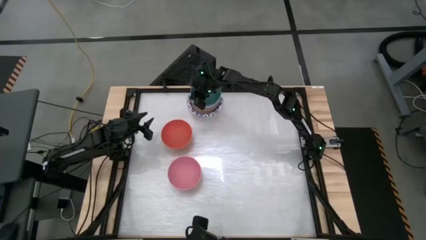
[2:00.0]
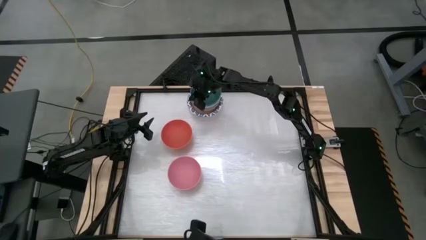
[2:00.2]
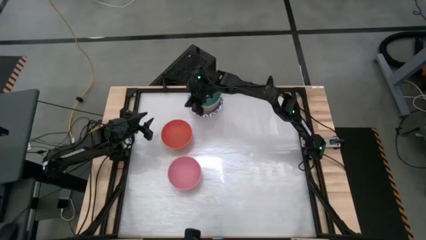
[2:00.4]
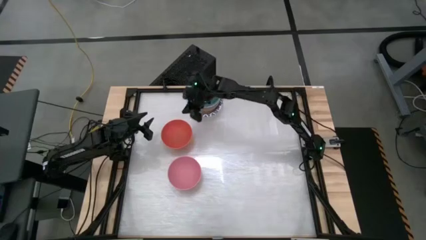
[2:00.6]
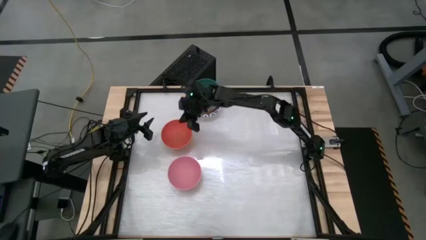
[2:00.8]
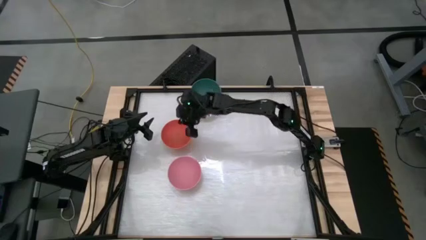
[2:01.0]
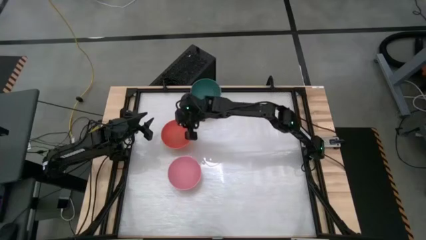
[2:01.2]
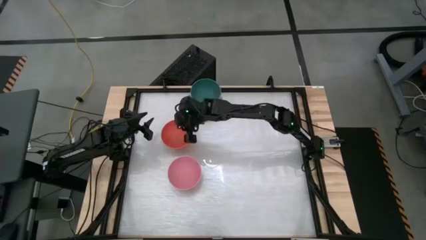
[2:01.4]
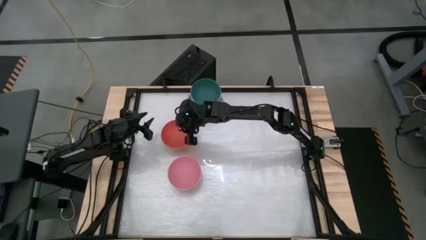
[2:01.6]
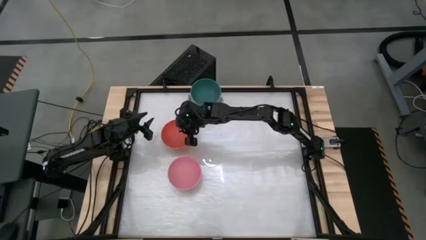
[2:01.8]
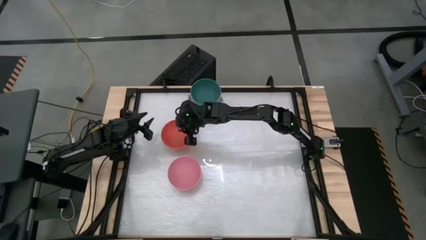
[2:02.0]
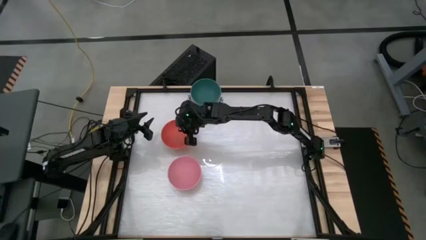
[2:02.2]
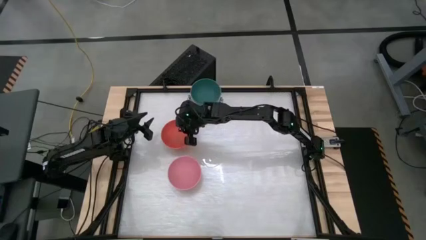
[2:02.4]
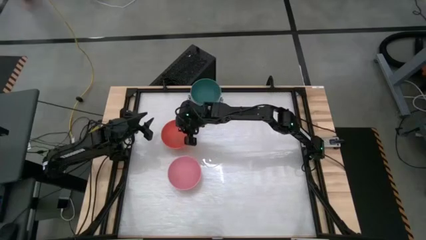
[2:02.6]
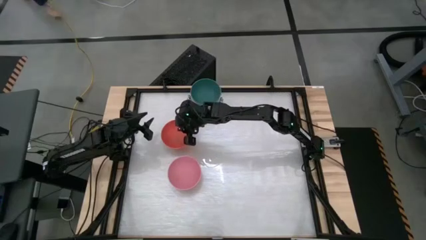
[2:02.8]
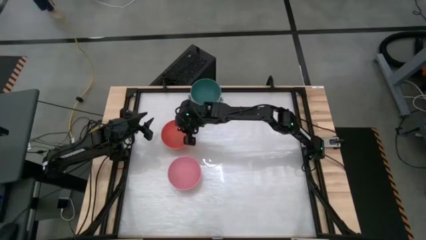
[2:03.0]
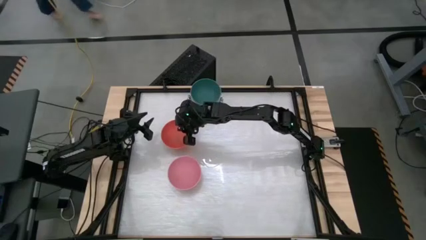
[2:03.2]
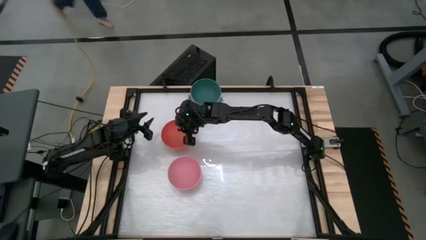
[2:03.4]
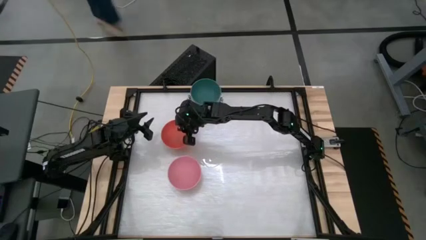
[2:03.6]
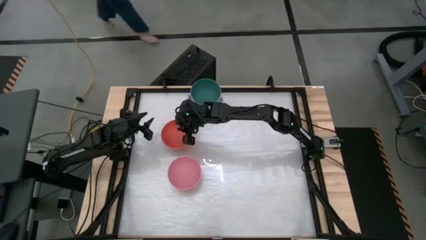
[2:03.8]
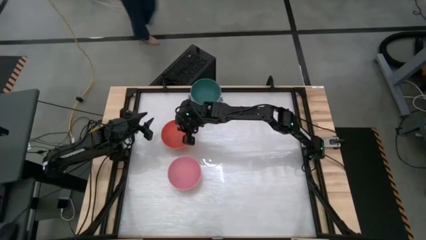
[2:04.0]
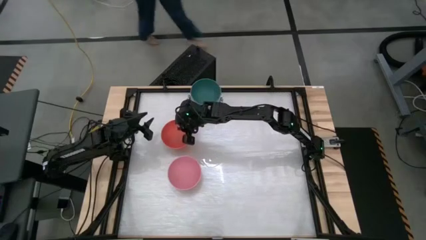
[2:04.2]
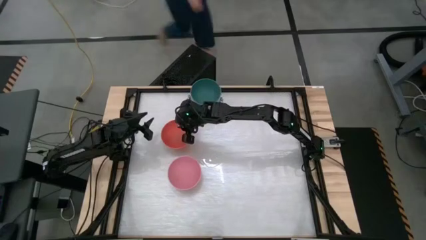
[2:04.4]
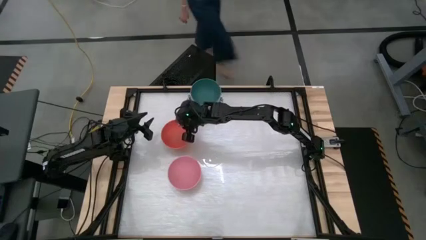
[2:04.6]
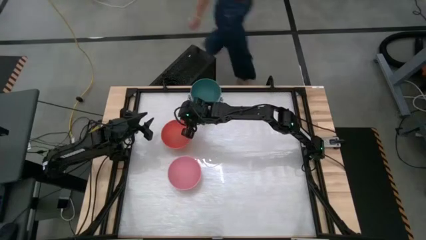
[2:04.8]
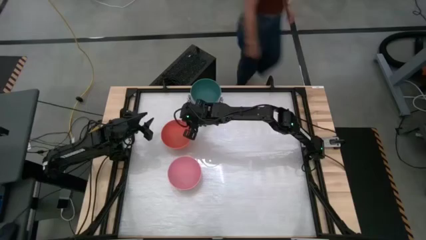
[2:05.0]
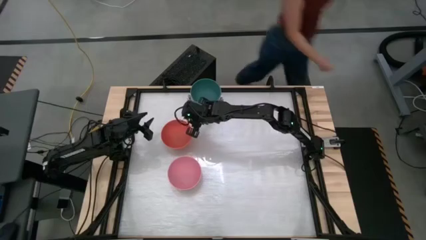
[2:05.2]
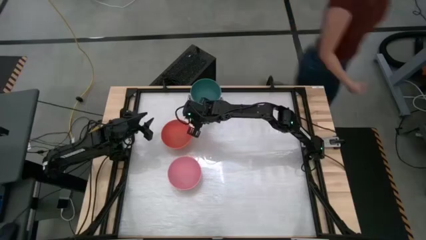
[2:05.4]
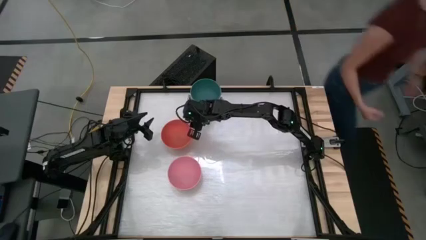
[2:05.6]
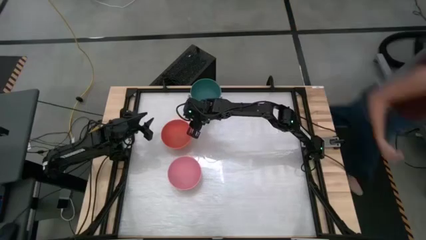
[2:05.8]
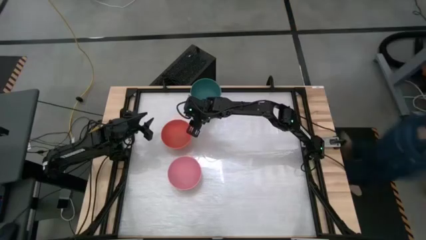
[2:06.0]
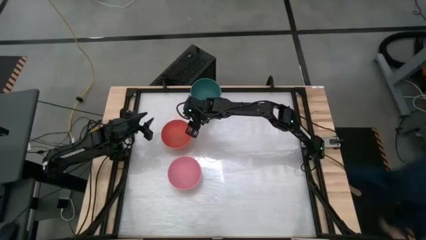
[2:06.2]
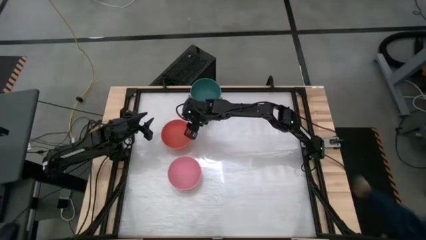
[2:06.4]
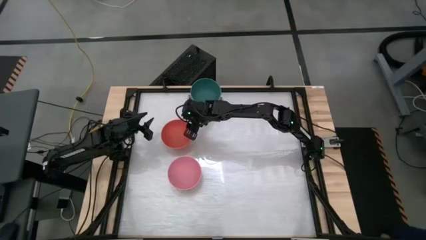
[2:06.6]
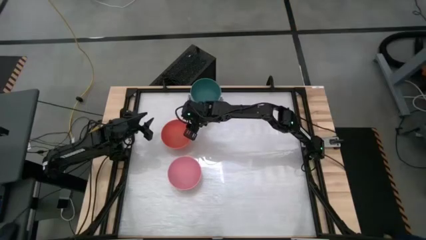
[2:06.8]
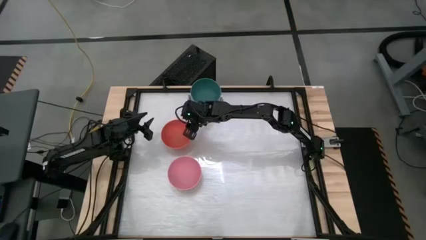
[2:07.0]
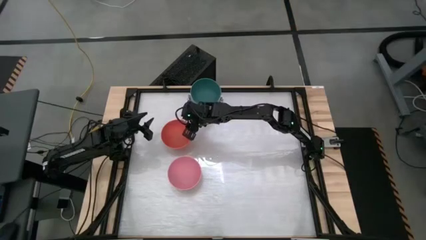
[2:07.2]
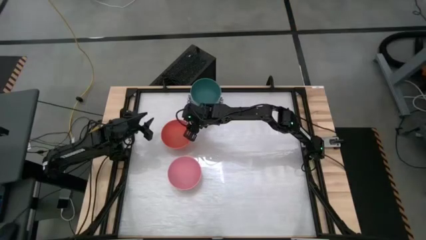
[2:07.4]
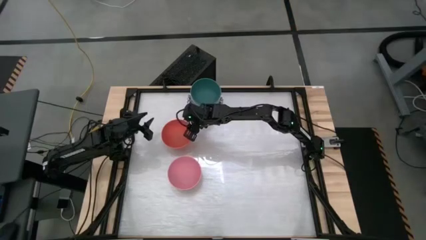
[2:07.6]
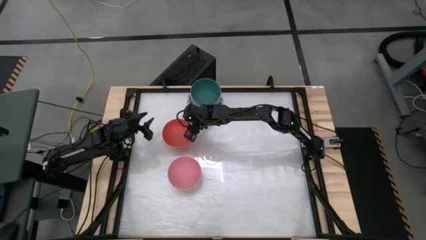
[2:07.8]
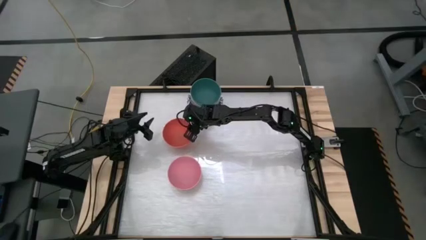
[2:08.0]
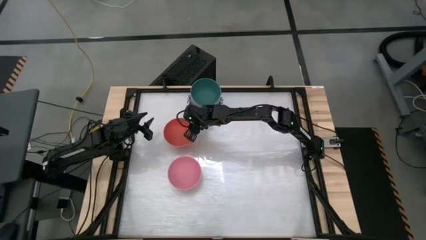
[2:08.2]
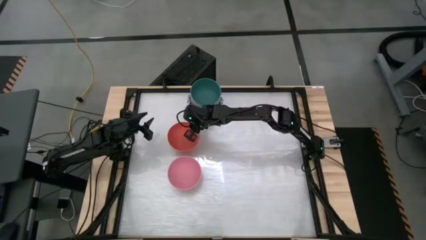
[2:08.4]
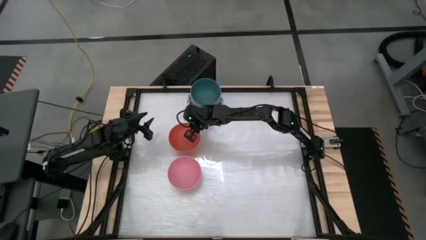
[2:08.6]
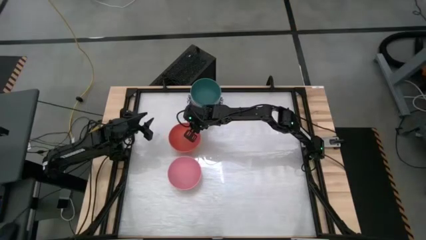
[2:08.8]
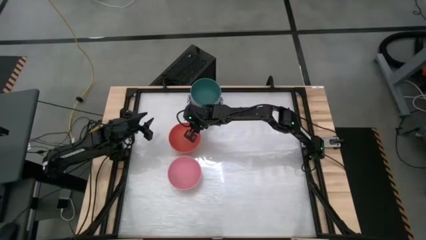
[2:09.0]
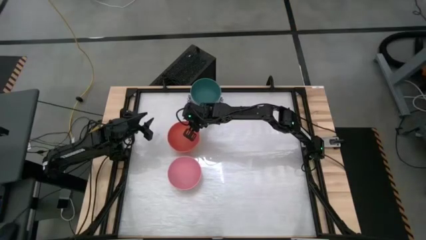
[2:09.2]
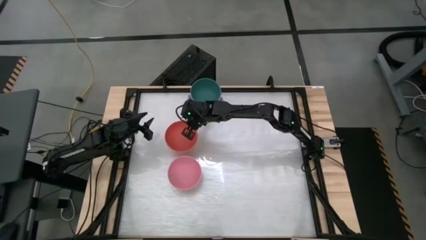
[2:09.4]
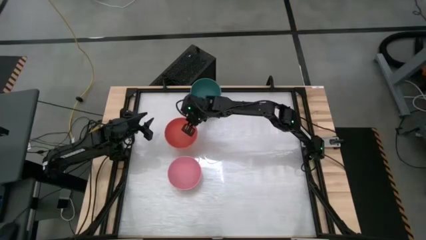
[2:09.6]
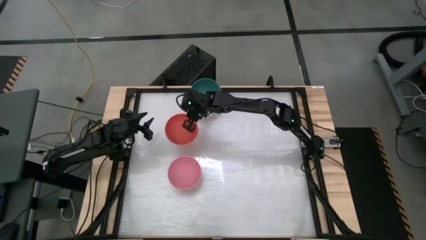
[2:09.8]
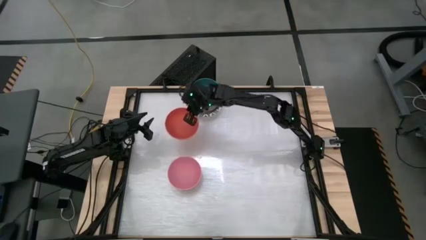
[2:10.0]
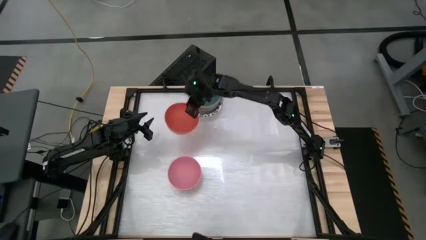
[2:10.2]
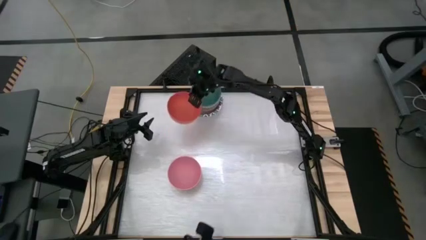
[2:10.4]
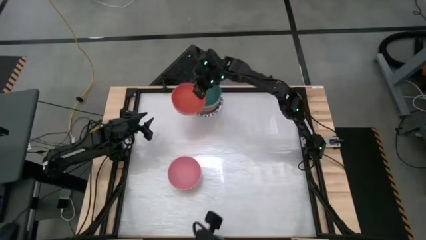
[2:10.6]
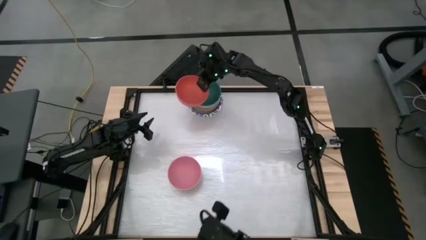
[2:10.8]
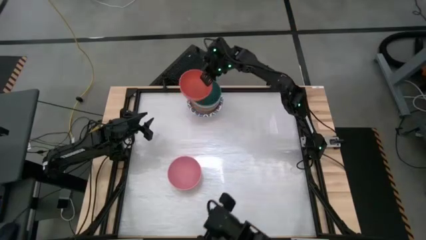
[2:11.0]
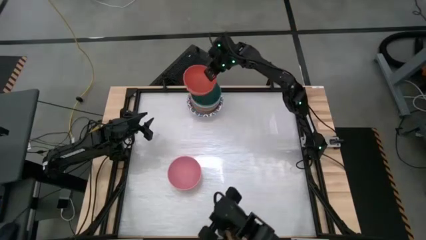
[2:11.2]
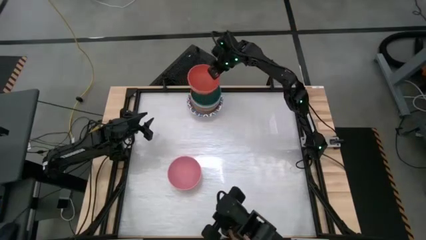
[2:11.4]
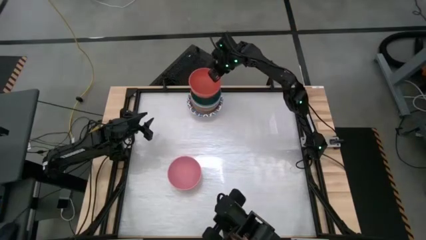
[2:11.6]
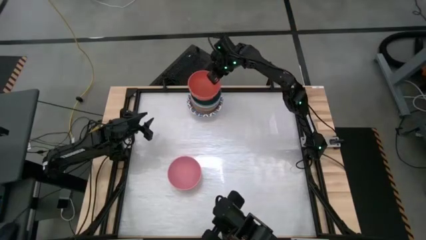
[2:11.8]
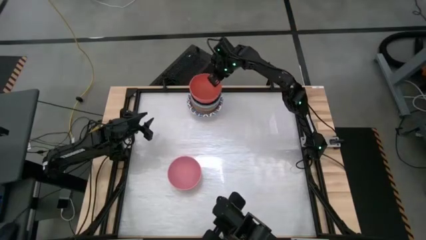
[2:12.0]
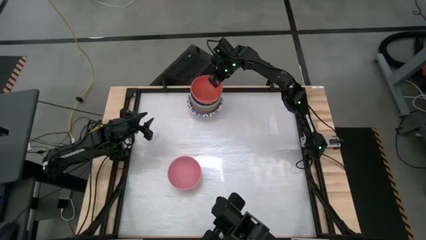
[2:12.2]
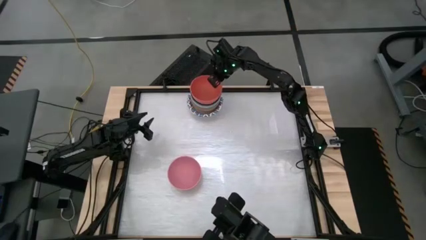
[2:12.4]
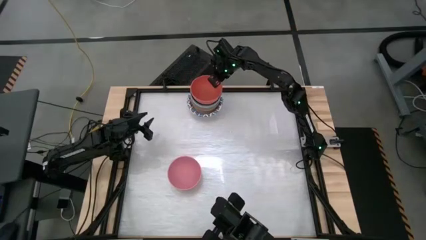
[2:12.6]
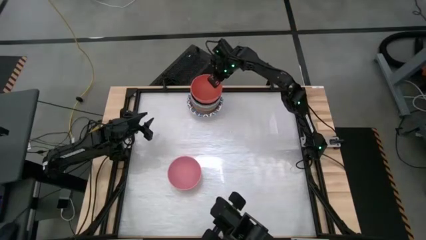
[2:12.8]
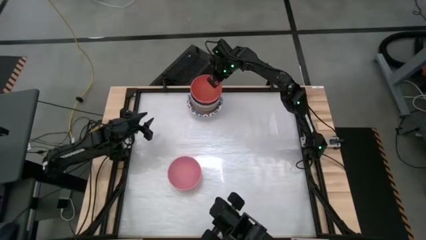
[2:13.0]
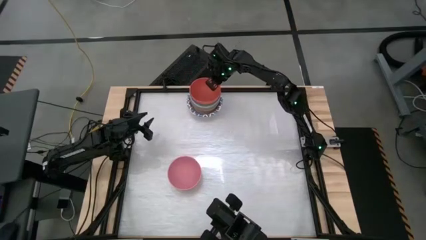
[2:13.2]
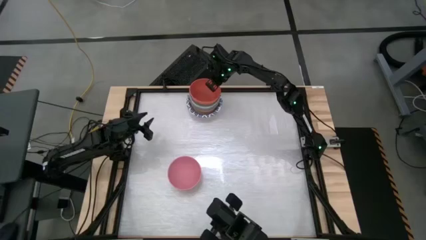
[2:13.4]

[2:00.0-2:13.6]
Stack the orange bowl onto the stack of bowls
